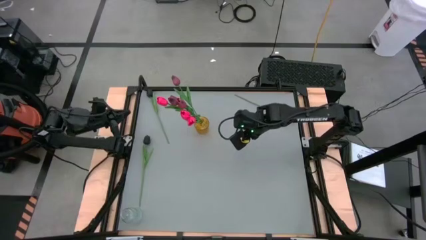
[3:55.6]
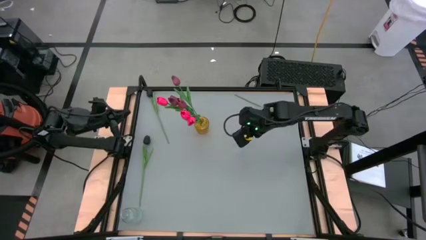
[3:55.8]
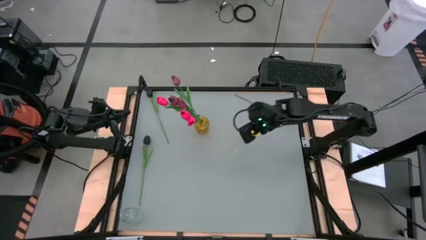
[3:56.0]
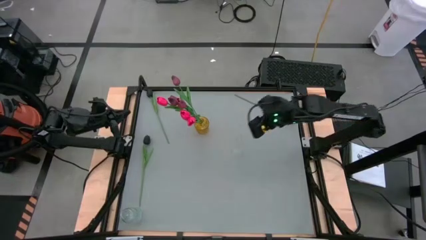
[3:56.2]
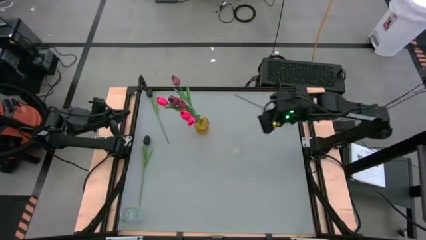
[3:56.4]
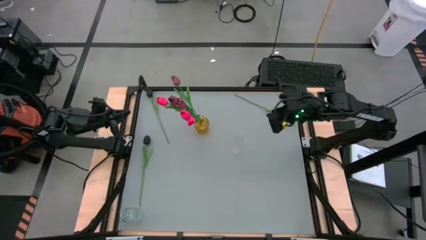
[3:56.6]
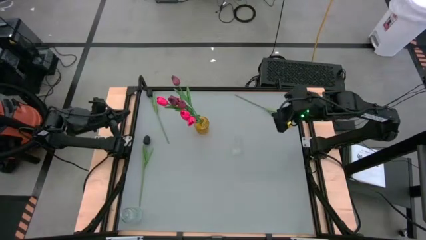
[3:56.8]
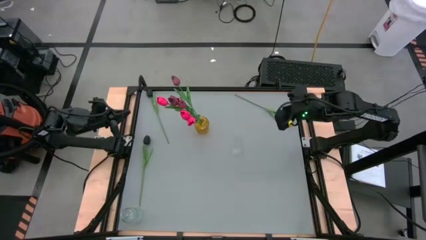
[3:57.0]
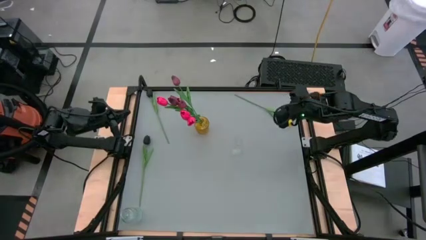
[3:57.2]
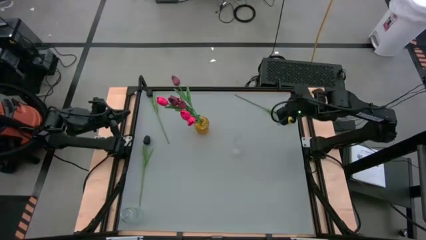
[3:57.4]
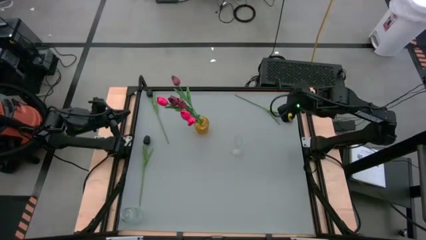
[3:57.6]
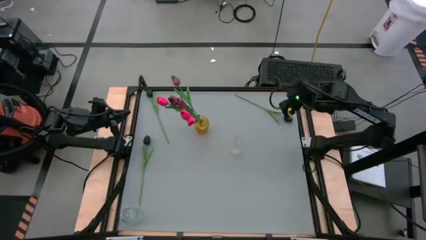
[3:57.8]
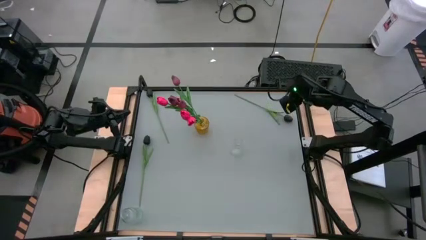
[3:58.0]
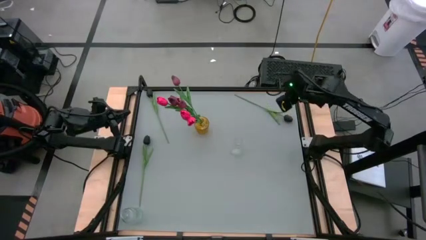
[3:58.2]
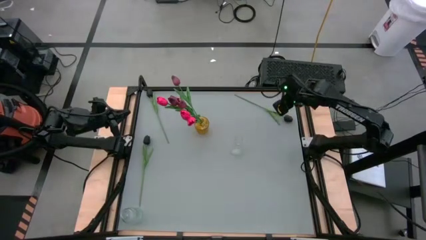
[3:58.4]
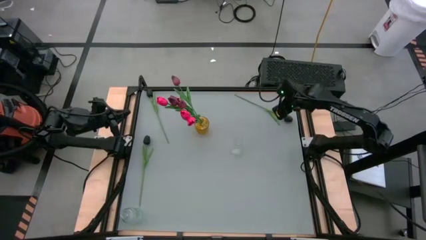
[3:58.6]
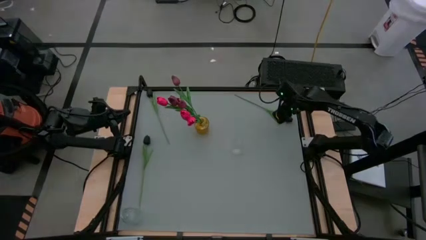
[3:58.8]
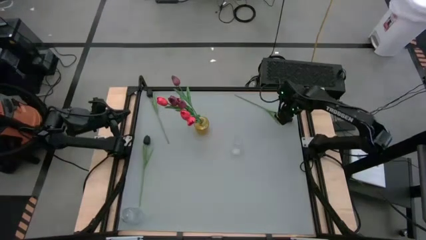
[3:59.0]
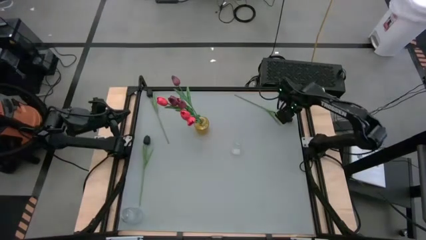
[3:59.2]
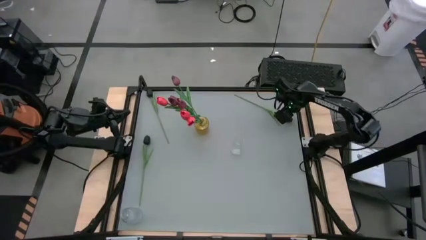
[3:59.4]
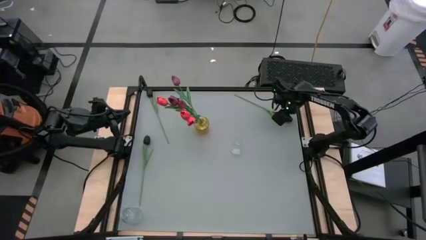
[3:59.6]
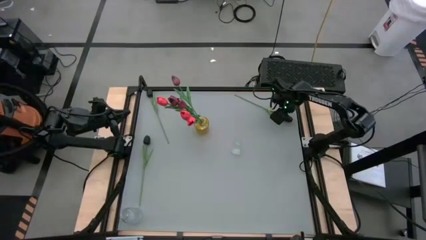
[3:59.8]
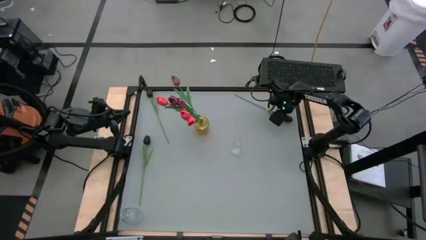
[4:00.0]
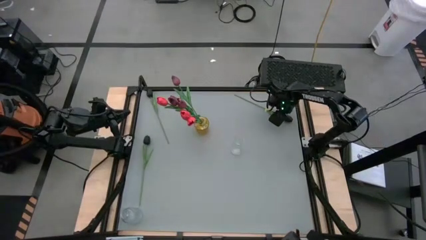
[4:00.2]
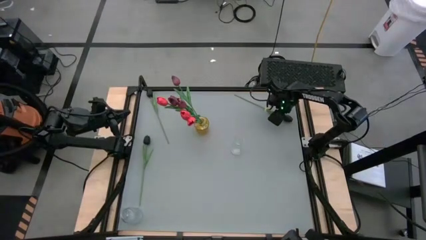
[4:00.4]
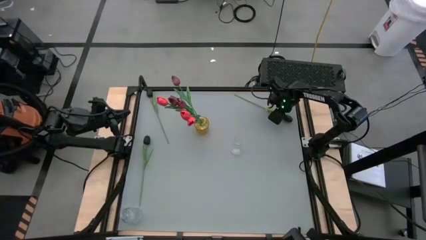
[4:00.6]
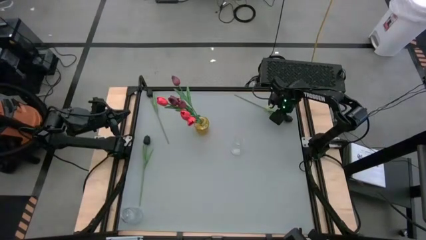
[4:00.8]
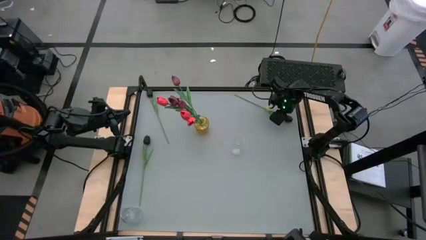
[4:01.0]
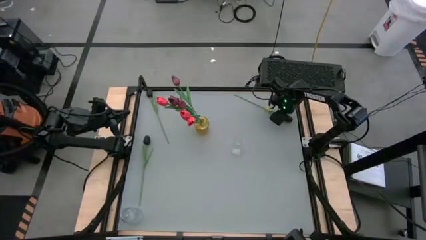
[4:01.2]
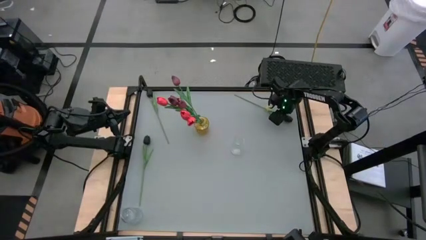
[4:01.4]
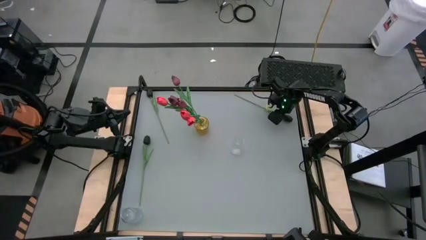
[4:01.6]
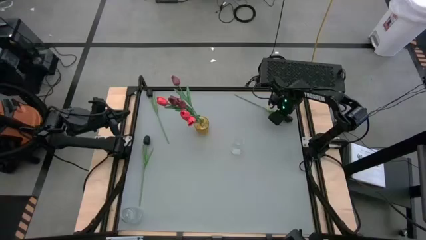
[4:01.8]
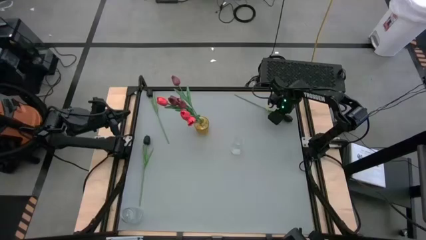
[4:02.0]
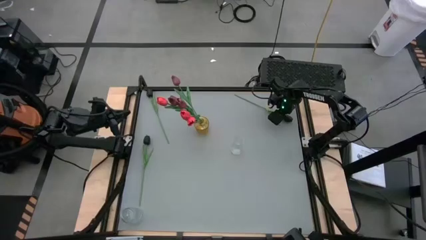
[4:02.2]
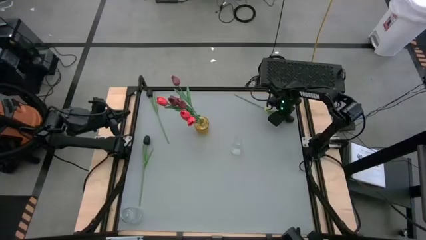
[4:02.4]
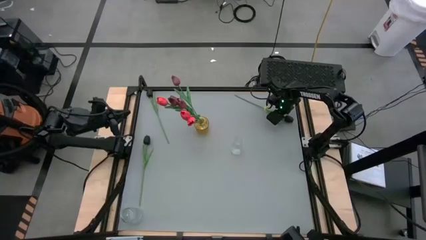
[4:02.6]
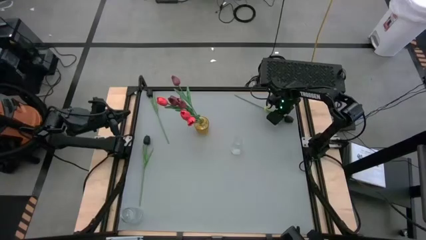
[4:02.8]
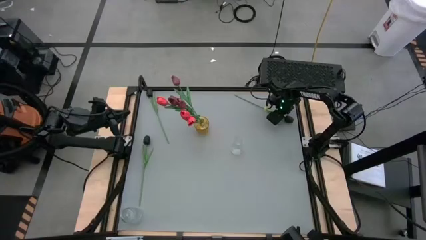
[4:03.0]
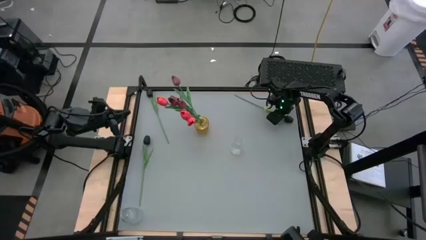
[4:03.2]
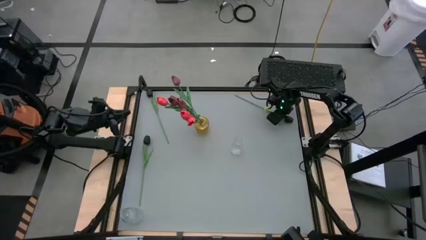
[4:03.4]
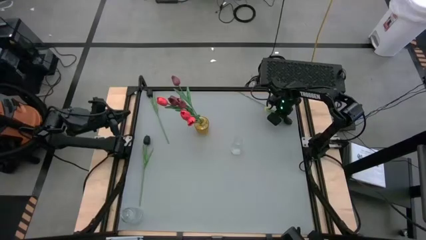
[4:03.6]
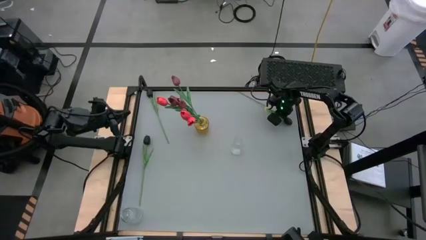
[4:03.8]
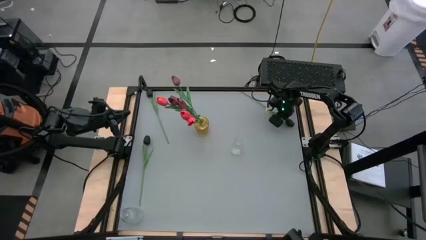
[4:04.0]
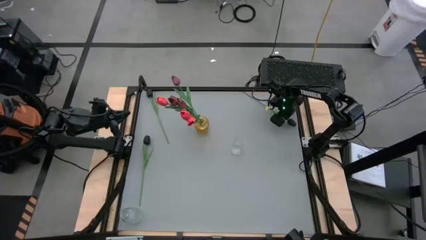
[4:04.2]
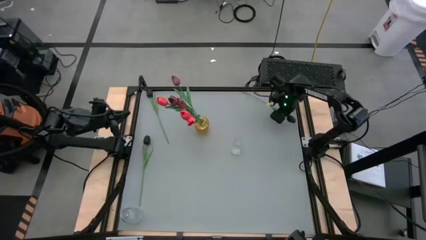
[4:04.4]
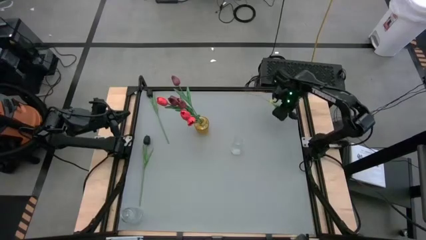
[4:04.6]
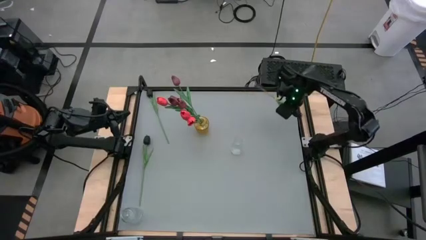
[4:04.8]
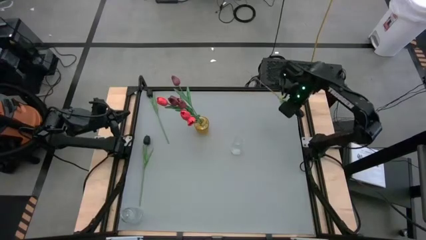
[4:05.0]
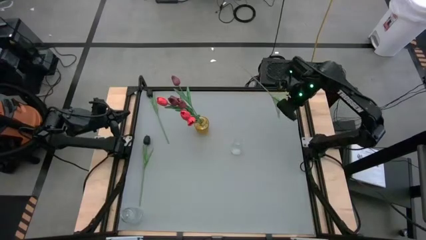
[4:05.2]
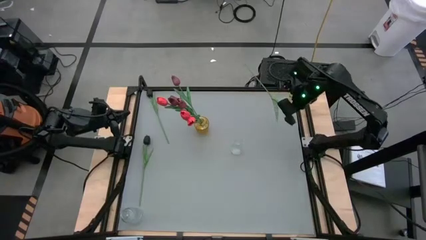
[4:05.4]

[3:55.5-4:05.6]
Task: Sort flowers into vase by color
Put the top right black flower into the transparent vase
